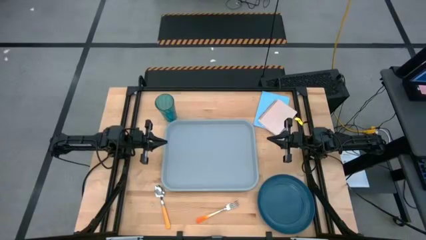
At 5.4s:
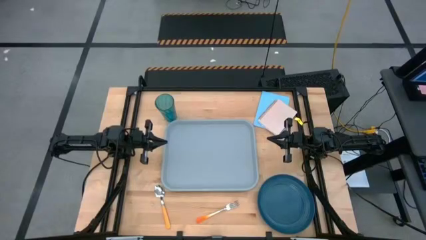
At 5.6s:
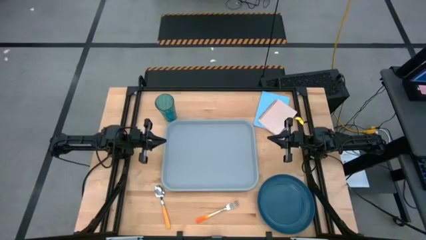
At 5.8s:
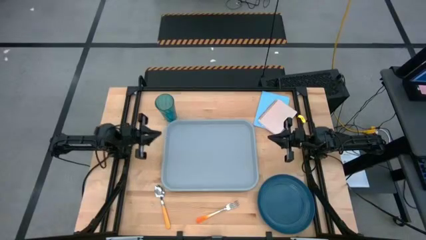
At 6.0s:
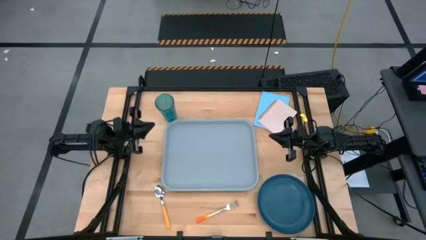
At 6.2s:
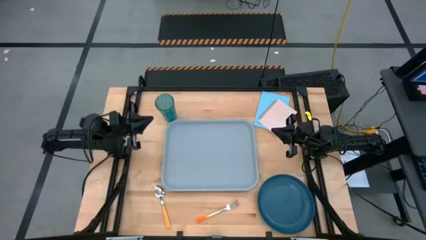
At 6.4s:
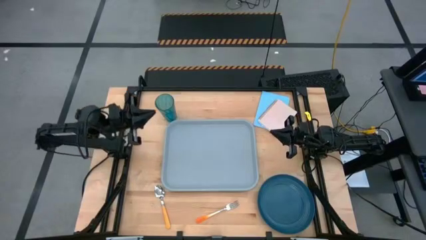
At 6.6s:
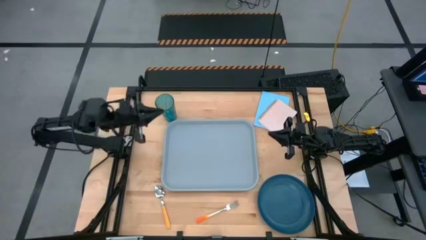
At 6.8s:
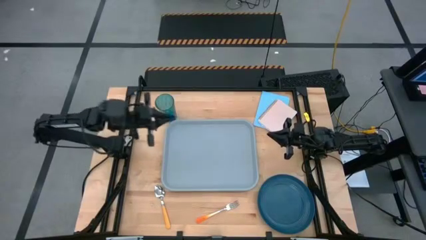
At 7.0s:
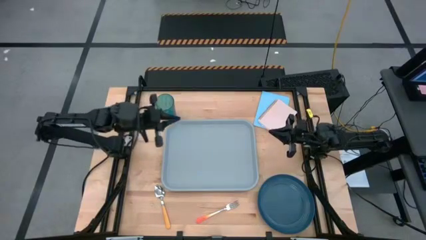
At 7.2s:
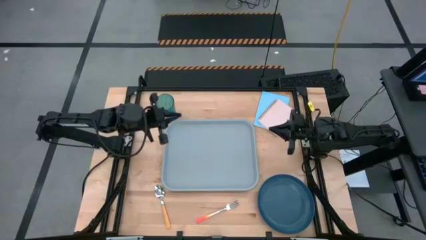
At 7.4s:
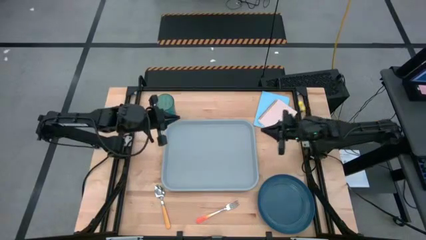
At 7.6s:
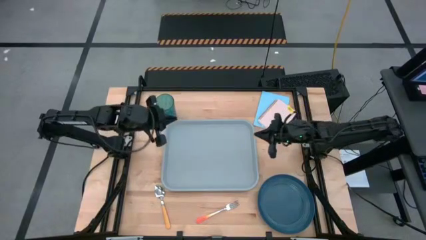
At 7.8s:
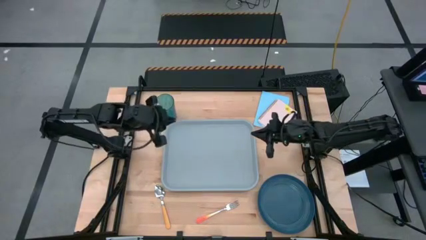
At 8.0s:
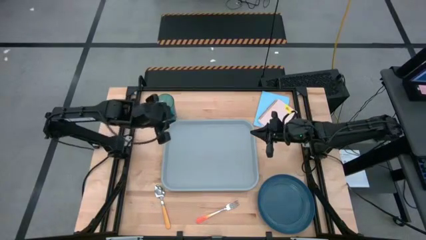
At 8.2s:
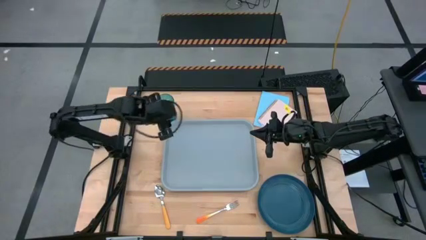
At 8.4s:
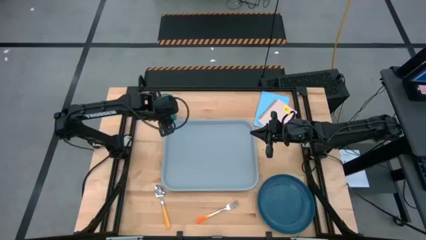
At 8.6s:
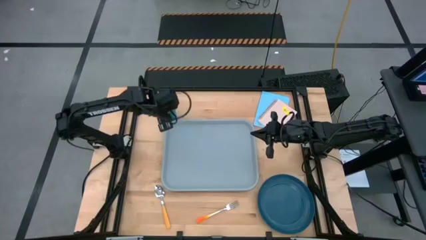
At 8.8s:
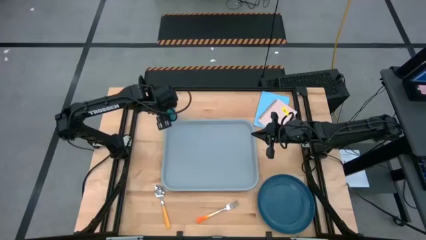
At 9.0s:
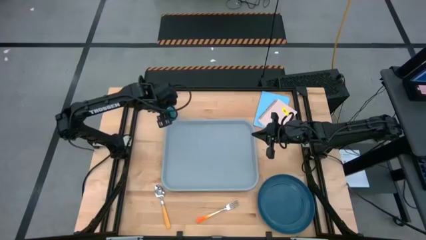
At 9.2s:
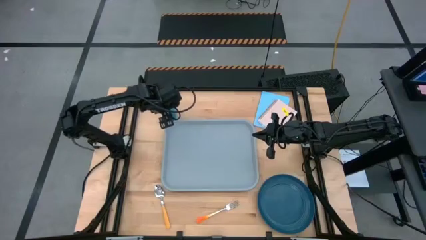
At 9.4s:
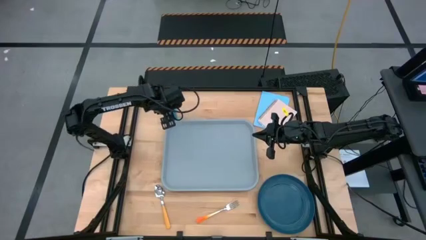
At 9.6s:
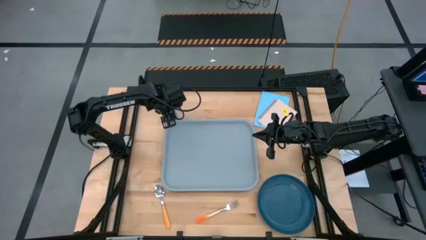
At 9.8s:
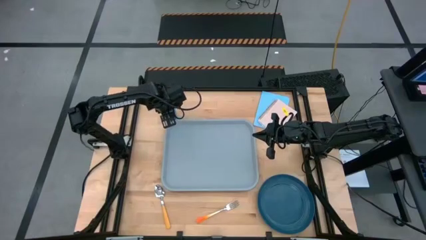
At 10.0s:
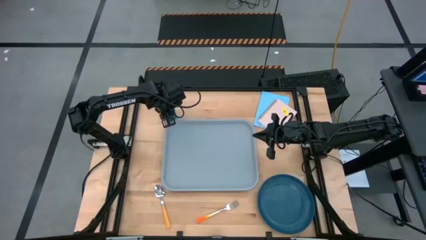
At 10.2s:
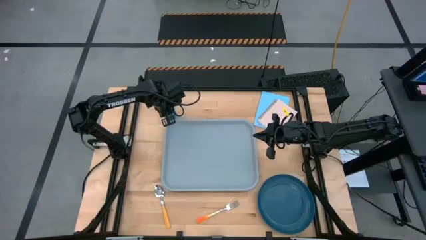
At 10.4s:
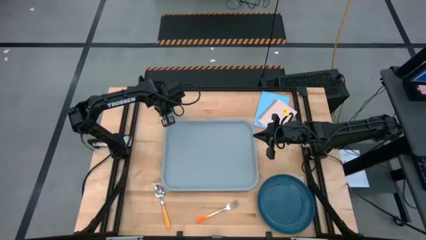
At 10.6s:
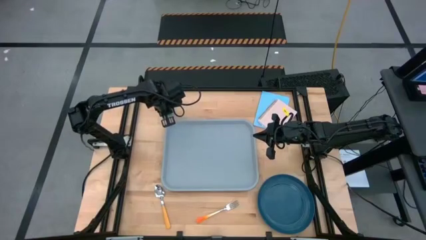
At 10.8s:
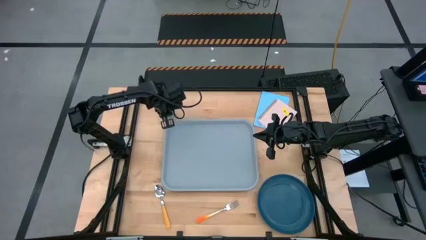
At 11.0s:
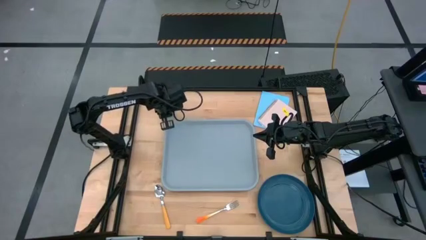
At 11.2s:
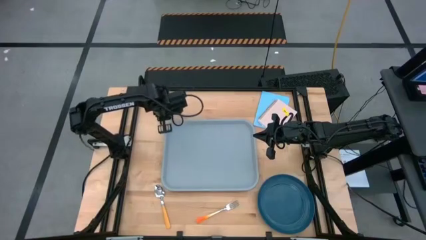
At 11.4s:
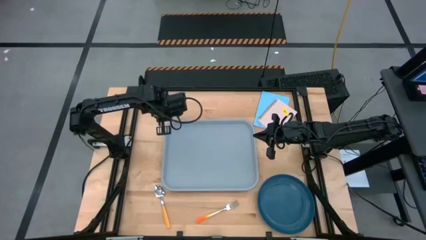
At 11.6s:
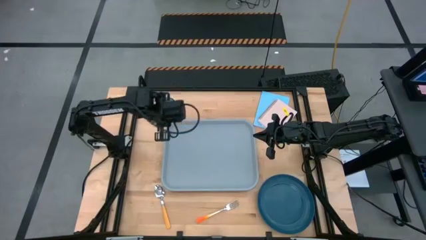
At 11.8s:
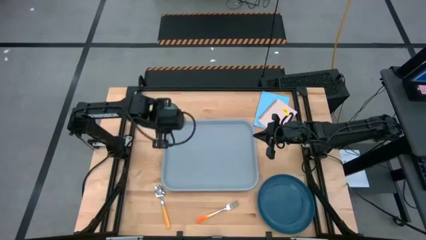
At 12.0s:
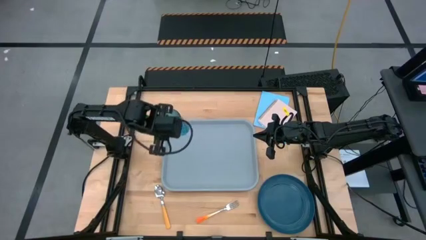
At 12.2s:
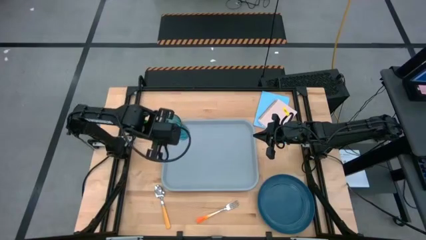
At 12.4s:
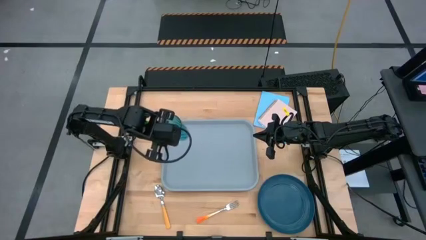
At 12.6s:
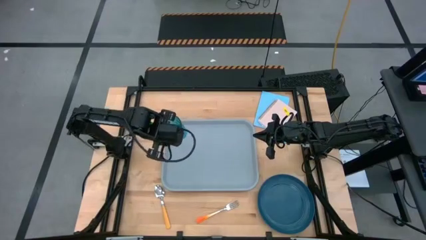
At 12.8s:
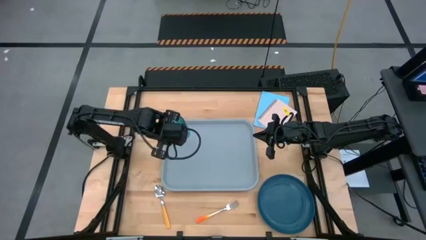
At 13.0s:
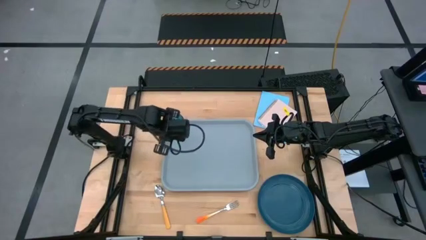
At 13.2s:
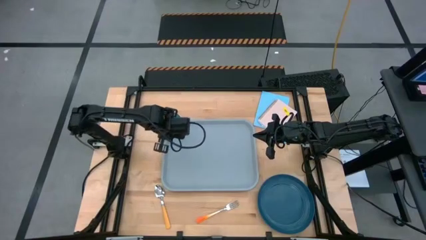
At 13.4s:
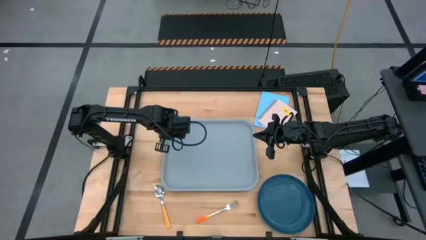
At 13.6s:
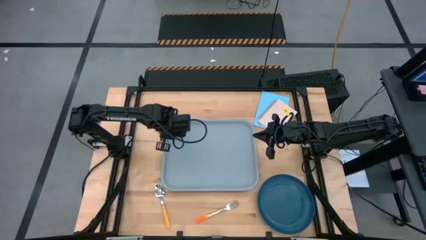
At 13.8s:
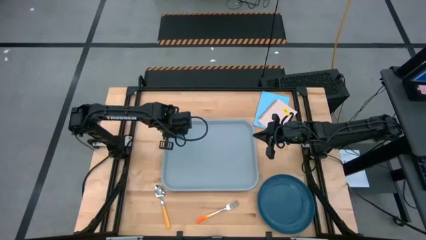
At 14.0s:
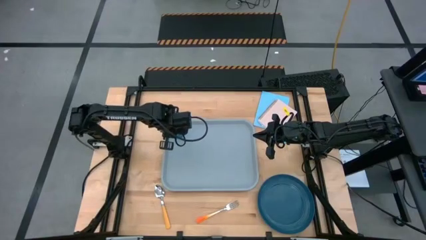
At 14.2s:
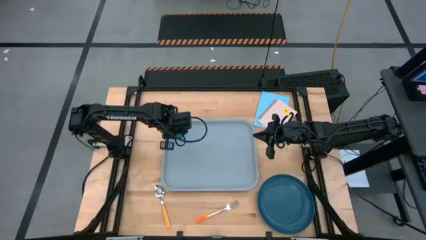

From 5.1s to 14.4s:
Task: Pick and place plate/cup/fork/spoon on tray
Put the blue cup on the top right of the gray serving tray

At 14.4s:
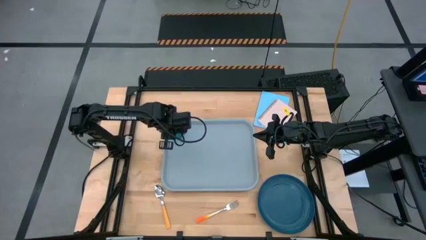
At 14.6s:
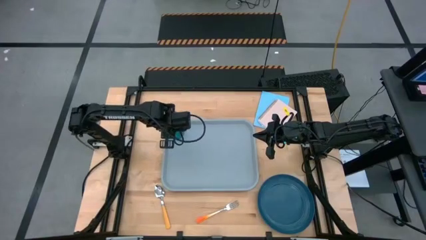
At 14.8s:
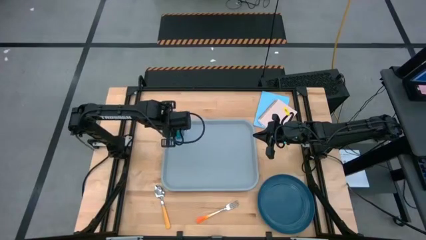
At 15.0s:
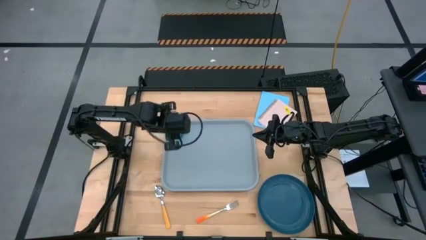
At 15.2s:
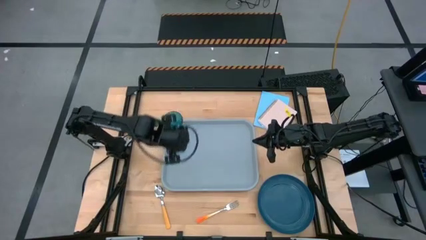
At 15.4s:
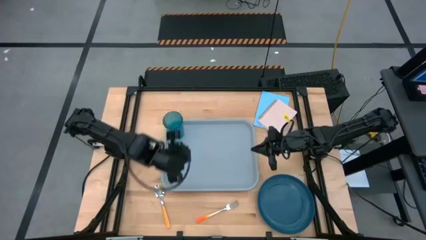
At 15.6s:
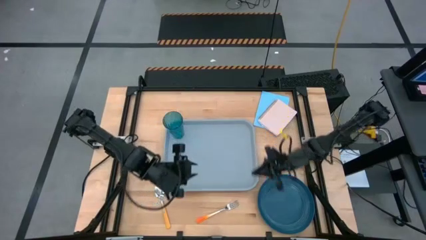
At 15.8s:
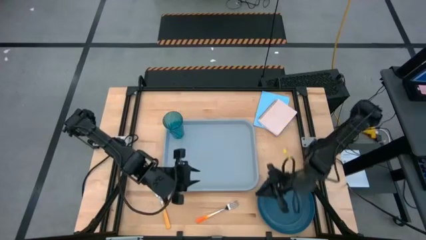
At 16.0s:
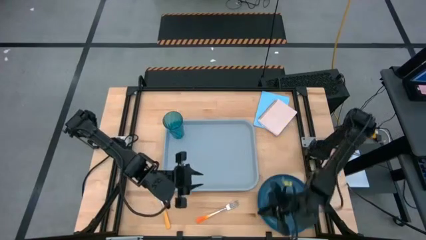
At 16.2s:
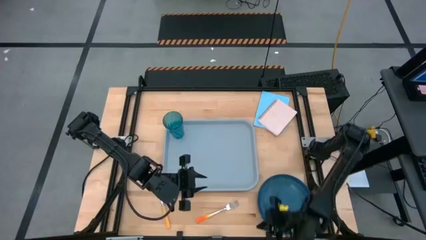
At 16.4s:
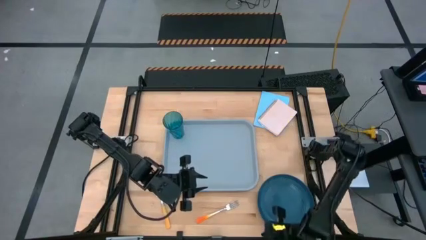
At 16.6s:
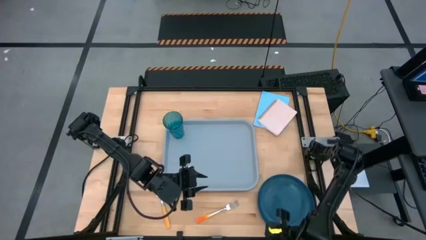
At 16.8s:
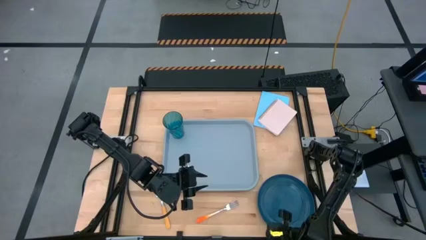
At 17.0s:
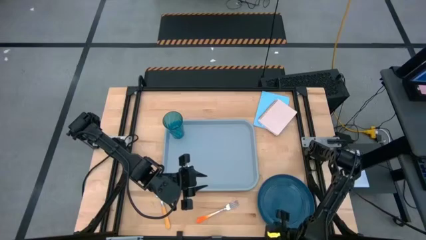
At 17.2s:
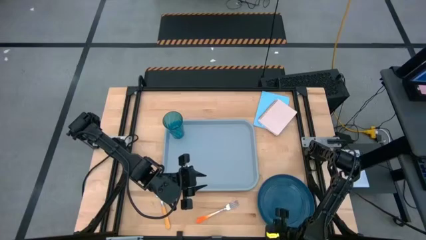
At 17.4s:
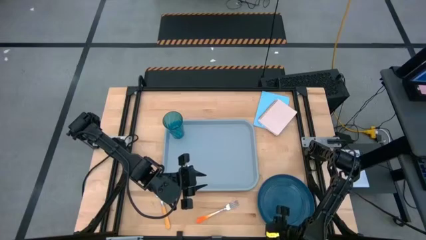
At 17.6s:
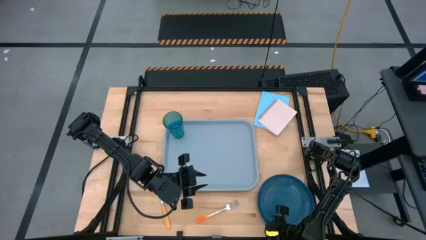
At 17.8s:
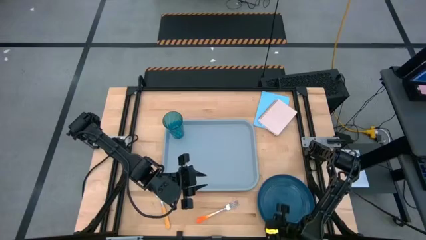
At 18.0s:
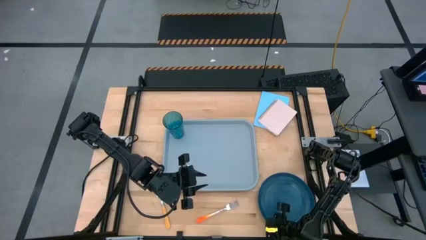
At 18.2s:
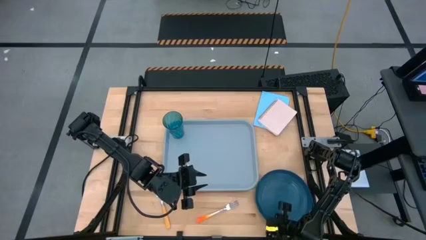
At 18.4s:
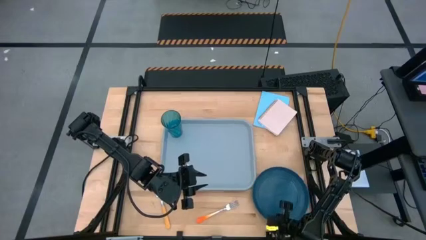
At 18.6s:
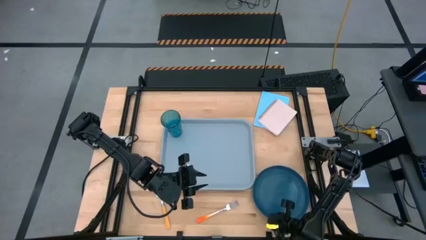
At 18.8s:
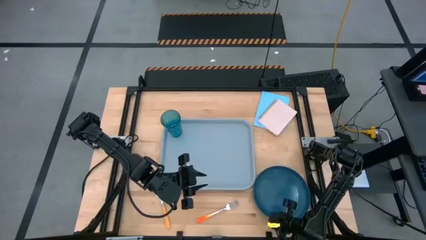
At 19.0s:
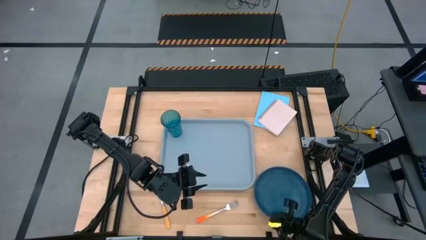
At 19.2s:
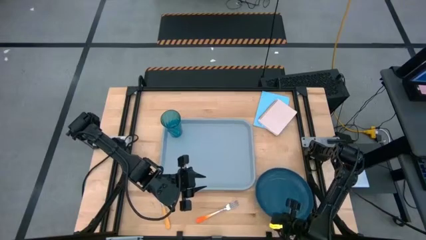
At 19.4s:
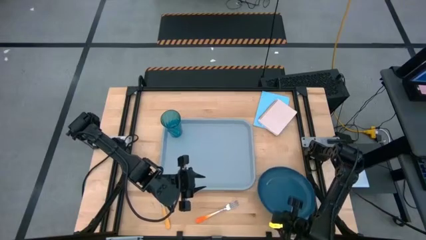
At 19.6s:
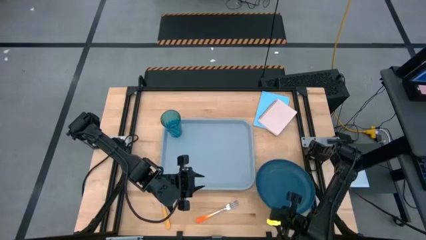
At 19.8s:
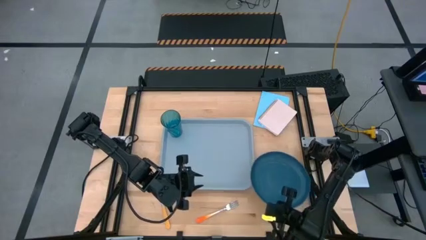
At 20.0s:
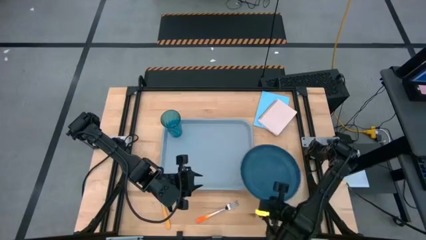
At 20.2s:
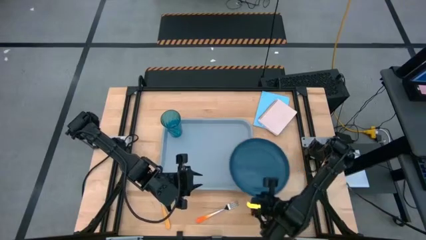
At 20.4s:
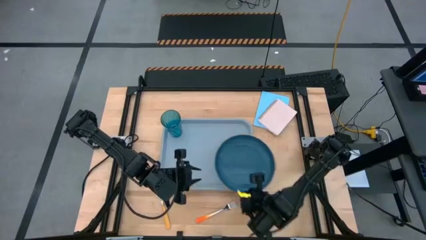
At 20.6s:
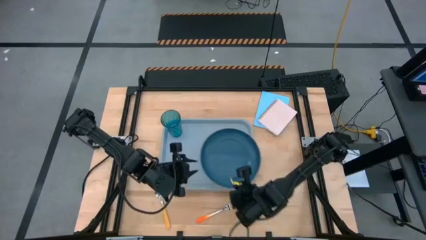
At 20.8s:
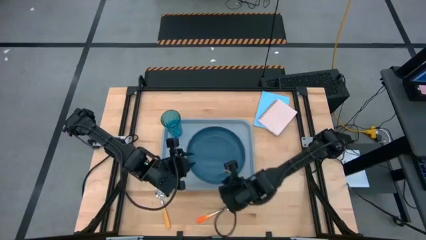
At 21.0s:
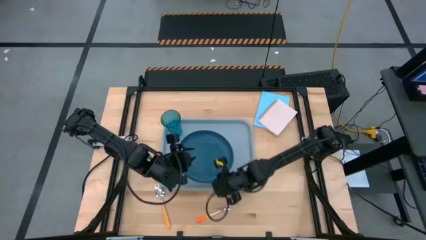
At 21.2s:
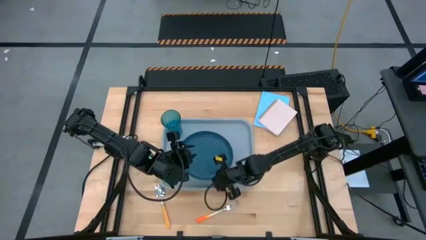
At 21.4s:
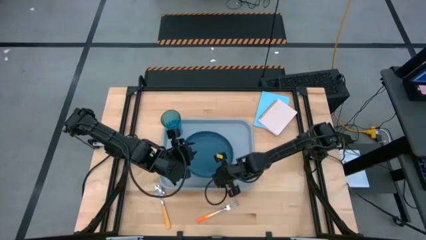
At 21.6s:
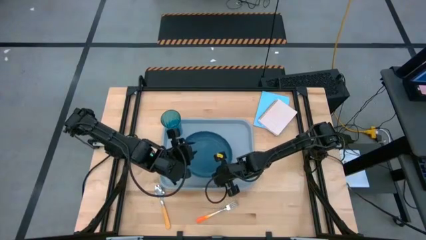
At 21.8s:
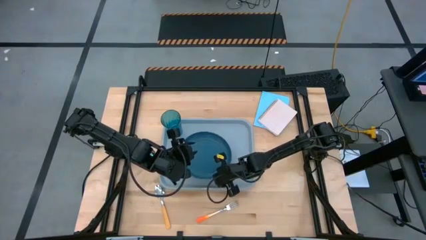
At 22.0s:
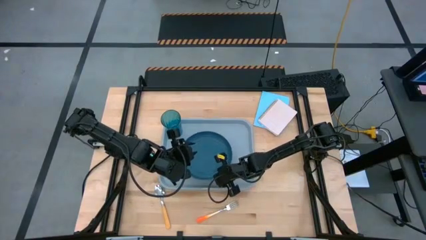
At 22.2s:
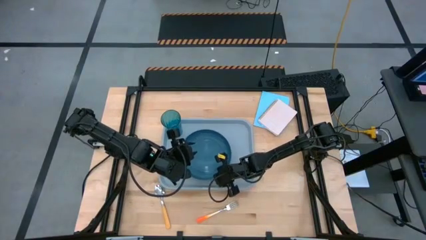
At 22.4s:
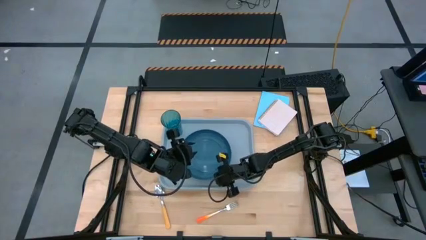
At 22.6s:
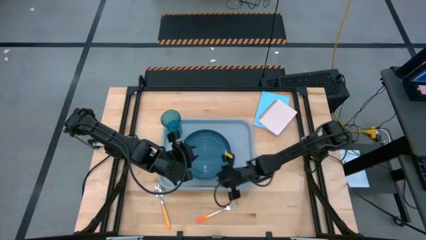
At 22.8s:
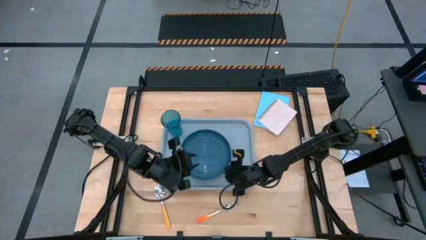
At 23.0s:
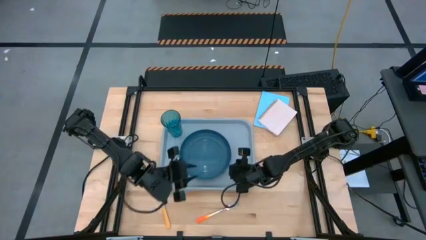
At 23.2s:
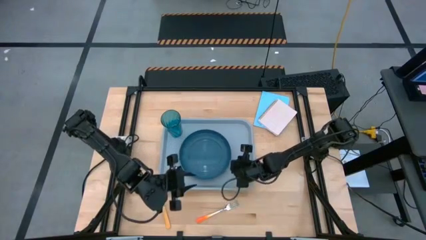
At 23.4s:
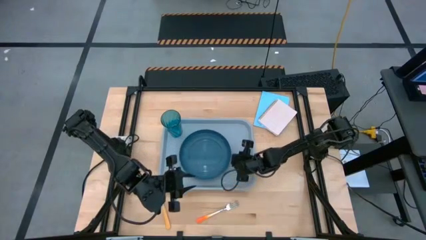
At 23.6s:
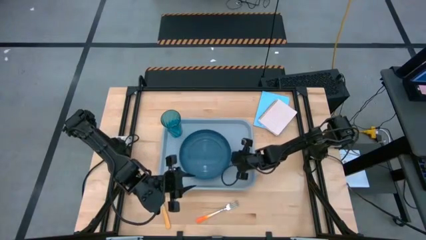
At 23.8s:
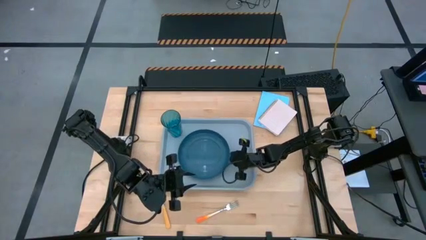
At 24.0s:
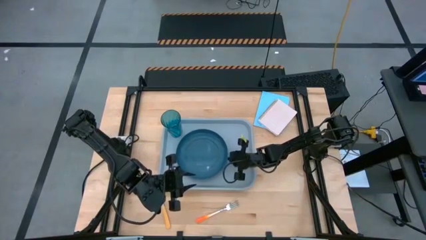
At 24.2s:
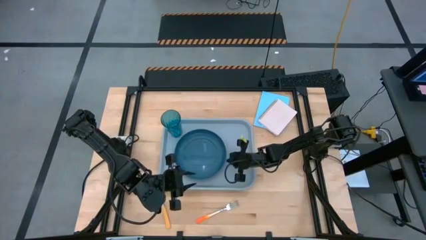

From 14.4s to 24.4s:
Put the blue plate at the bottom right of the blue cup on the gray serving tray
